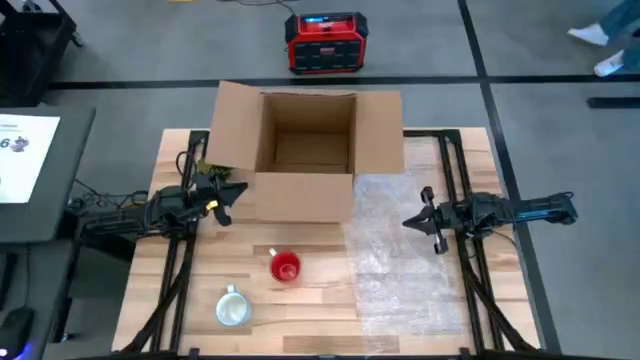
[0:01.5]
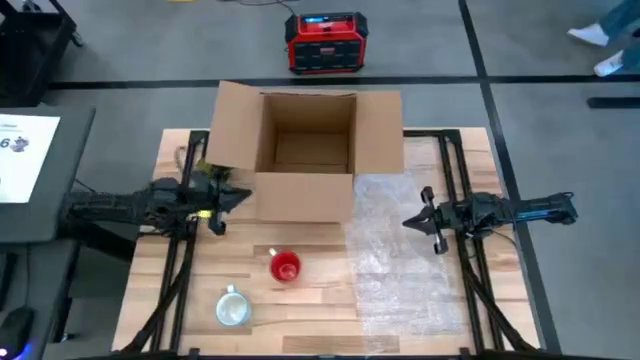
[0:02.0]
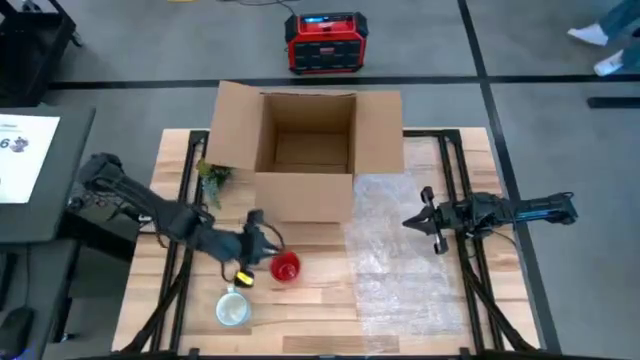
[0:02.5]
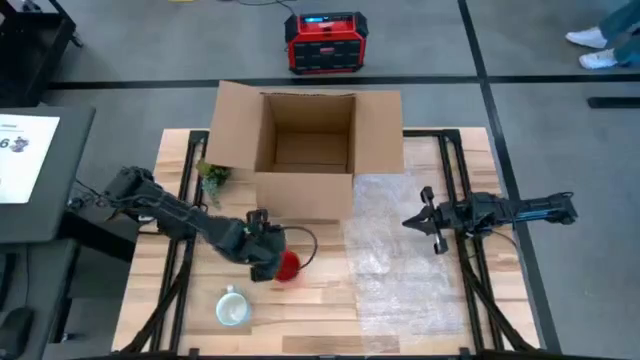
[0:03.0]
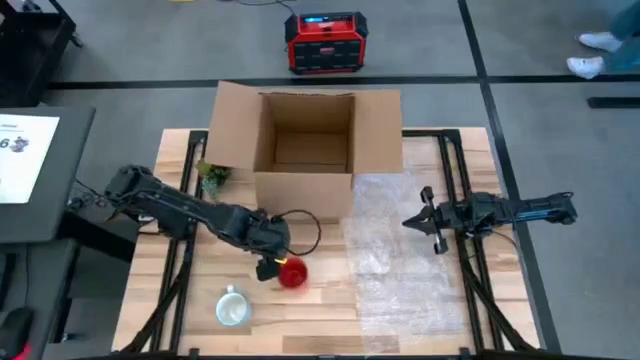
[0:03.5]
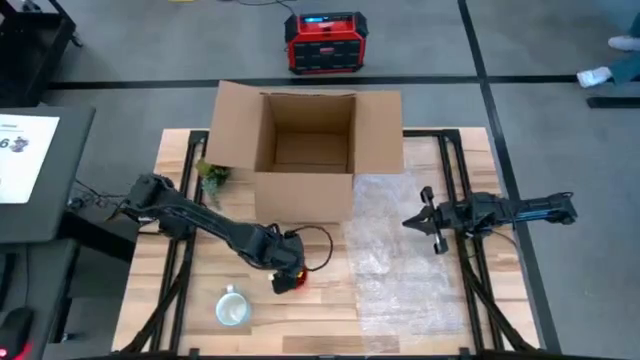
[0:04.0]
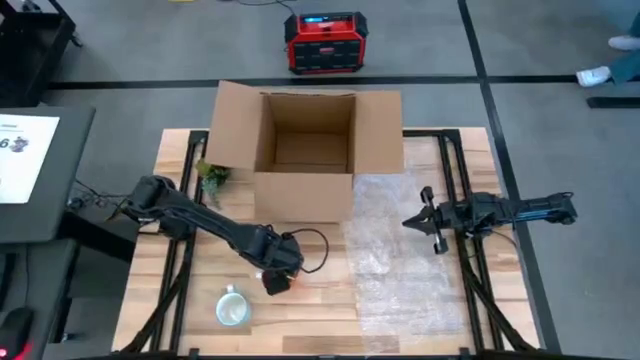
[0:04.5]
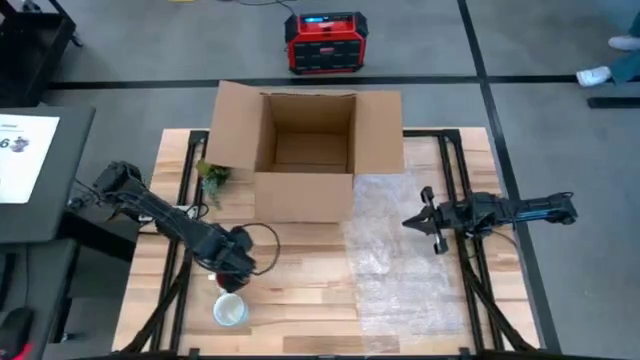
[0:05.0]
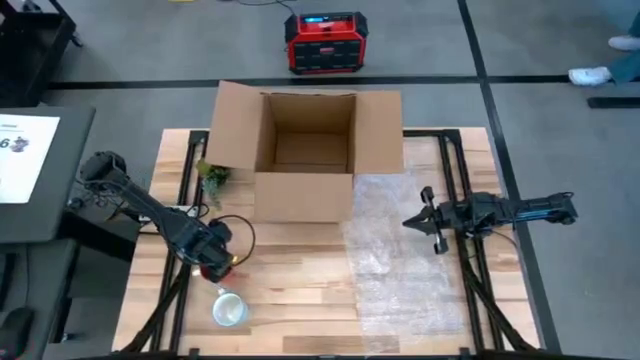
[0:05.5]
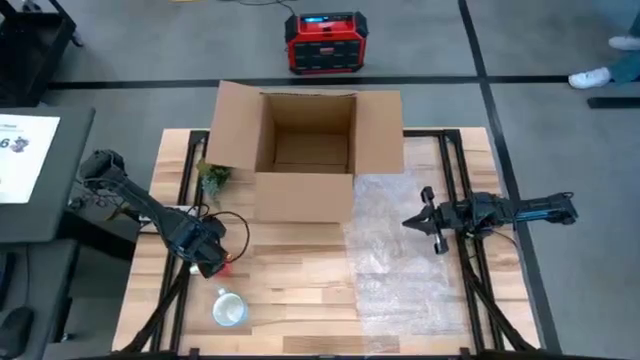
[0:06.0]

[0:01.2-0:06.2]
Task: wrap mug
Move the red mug to the middle left

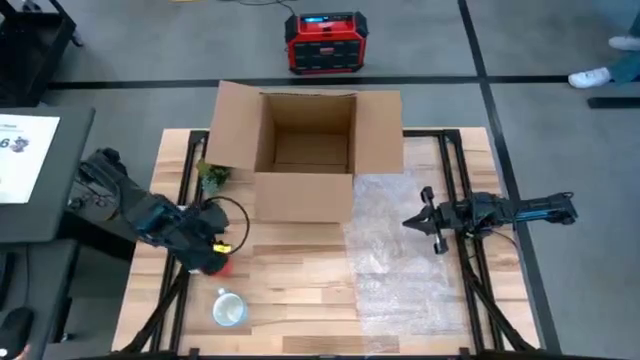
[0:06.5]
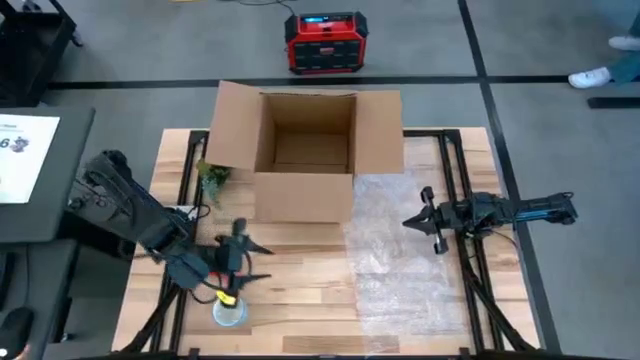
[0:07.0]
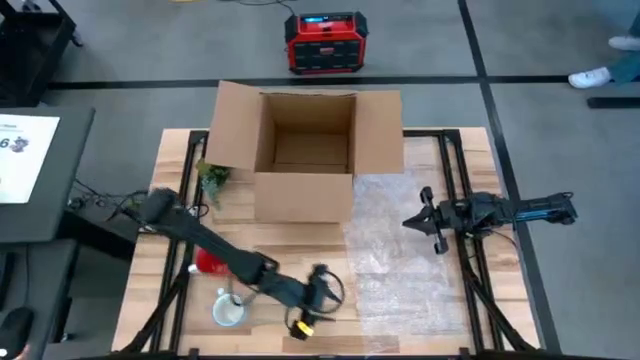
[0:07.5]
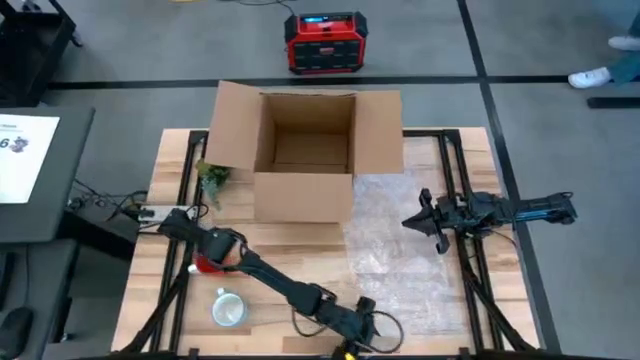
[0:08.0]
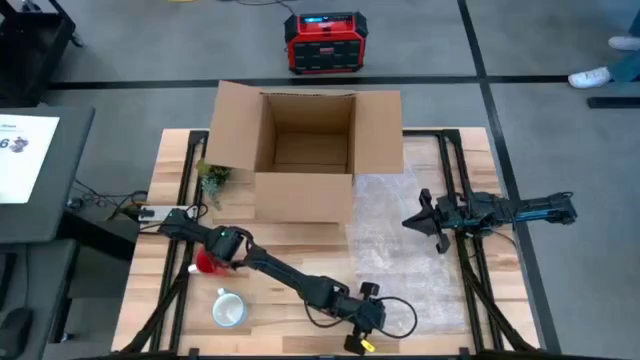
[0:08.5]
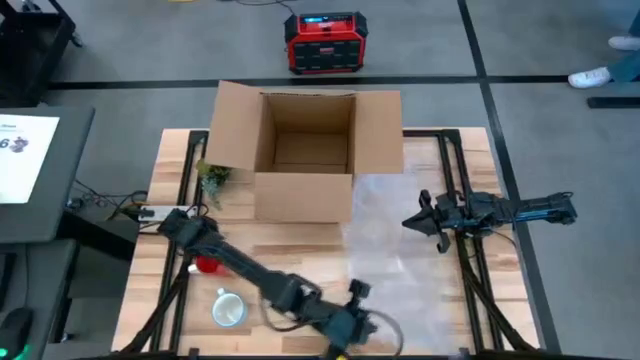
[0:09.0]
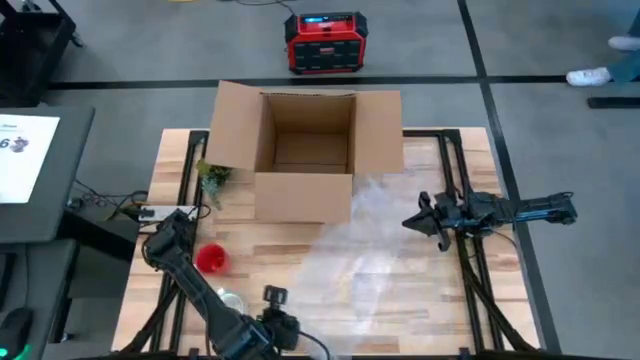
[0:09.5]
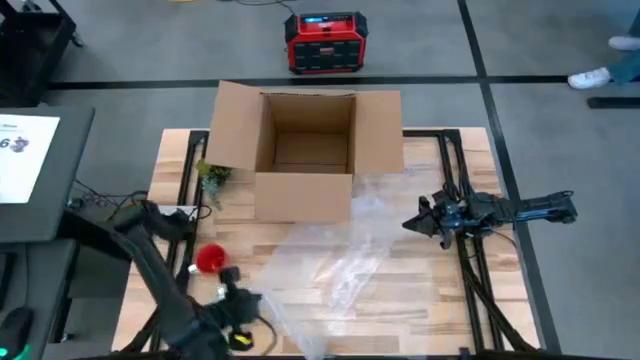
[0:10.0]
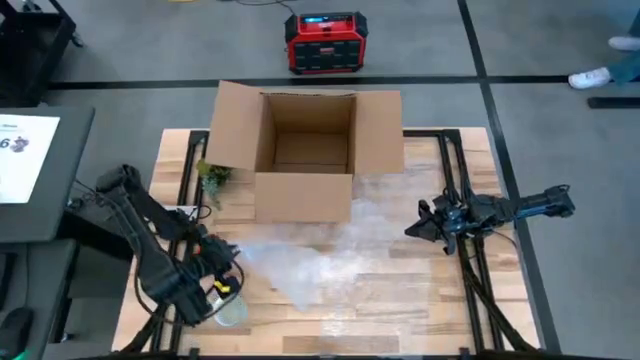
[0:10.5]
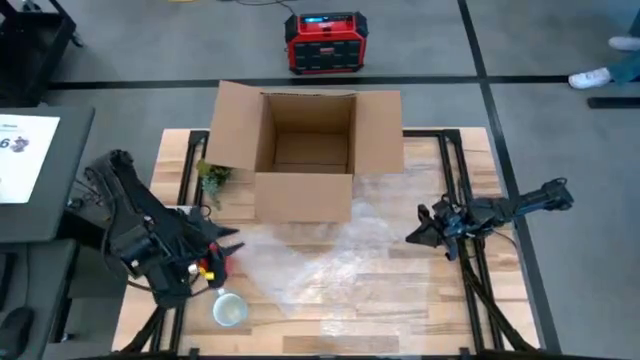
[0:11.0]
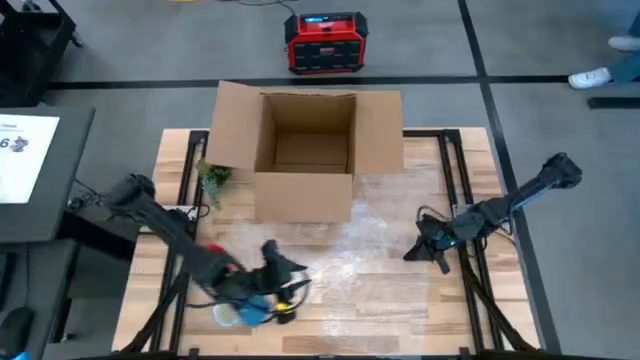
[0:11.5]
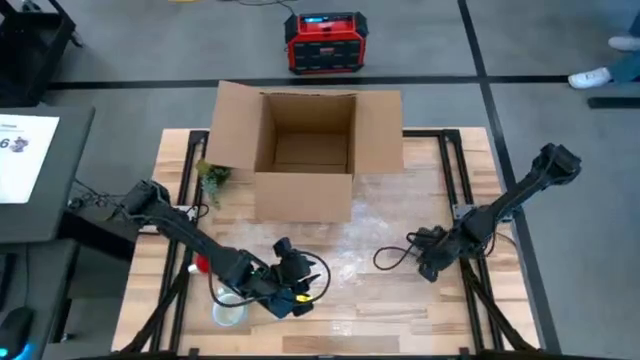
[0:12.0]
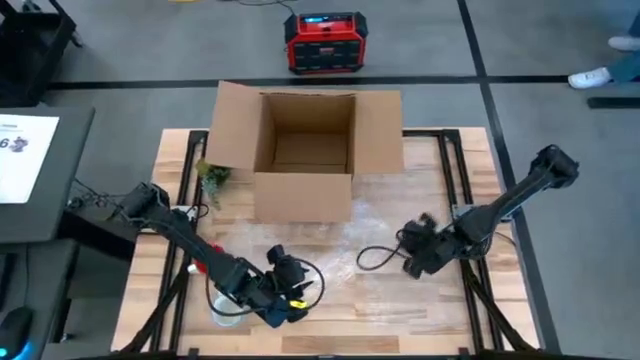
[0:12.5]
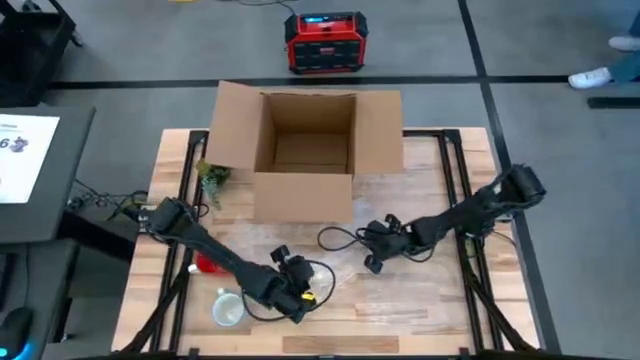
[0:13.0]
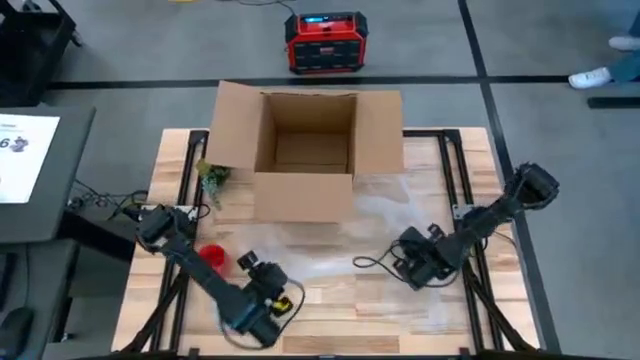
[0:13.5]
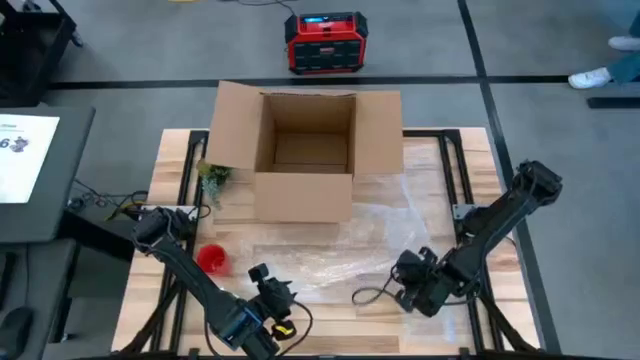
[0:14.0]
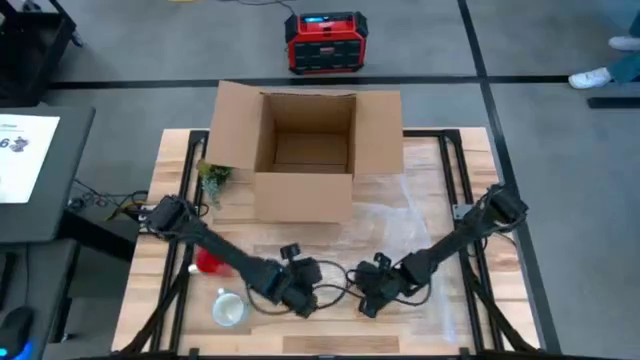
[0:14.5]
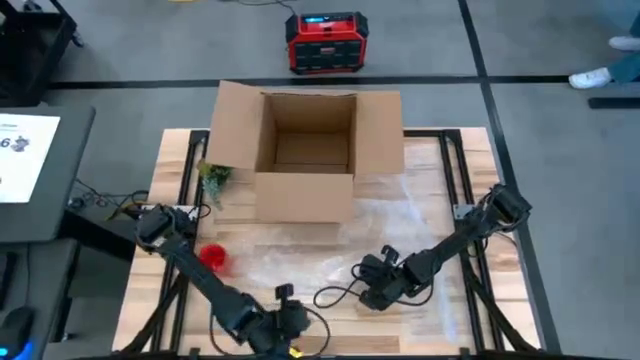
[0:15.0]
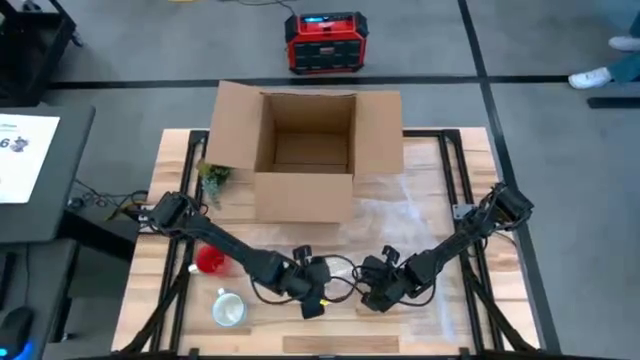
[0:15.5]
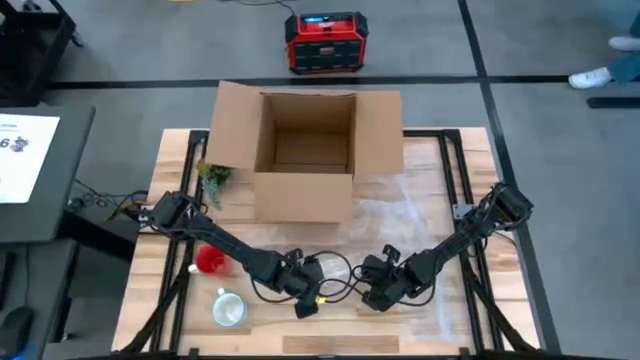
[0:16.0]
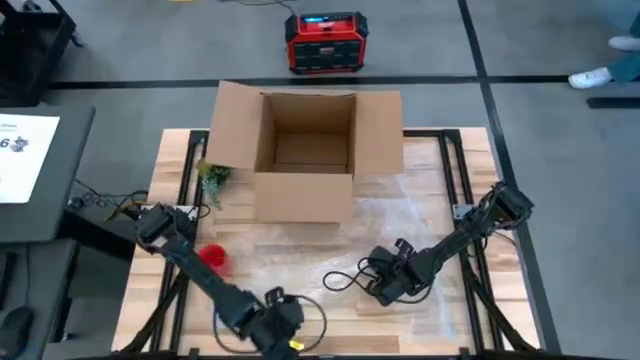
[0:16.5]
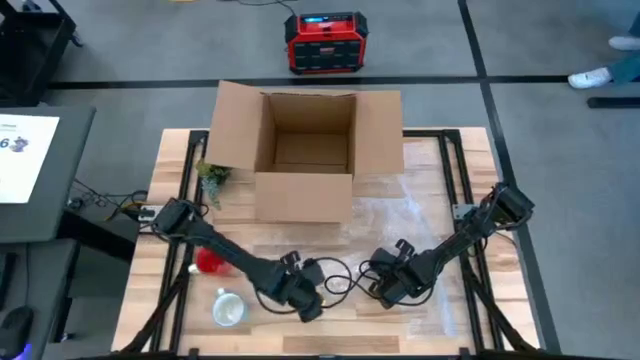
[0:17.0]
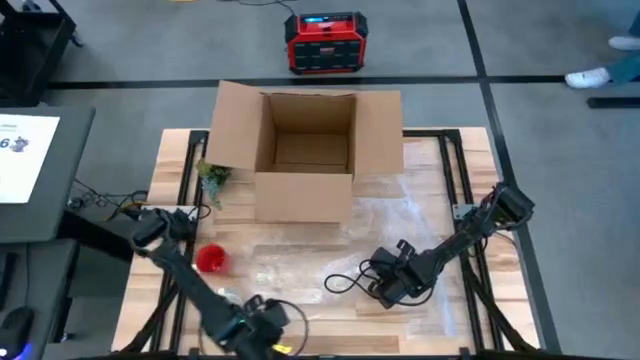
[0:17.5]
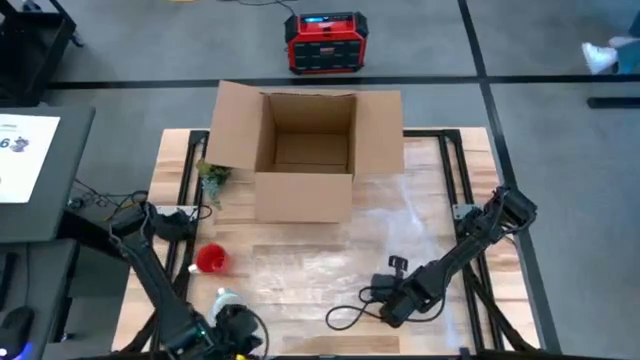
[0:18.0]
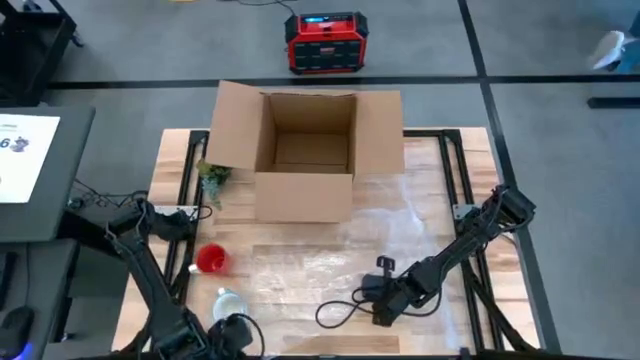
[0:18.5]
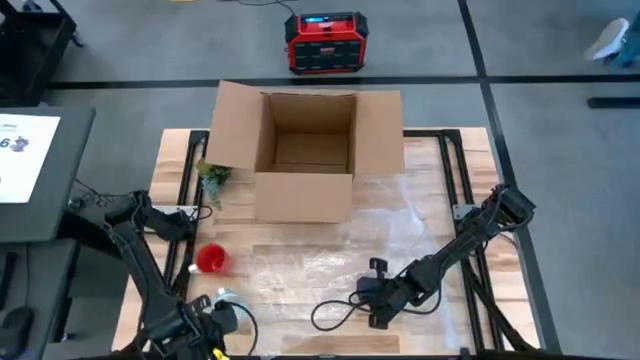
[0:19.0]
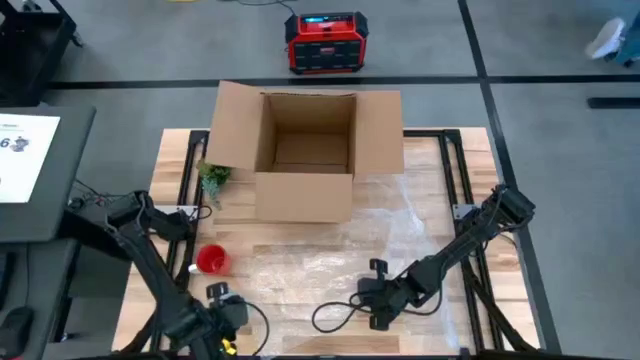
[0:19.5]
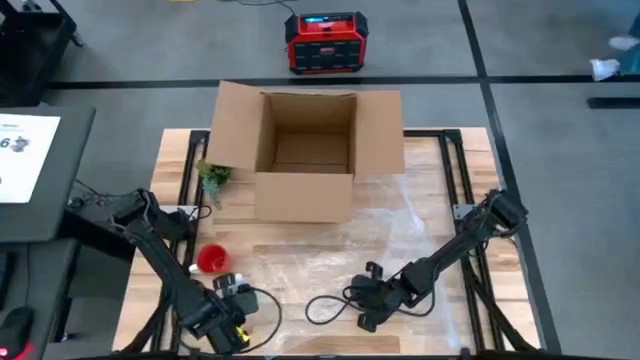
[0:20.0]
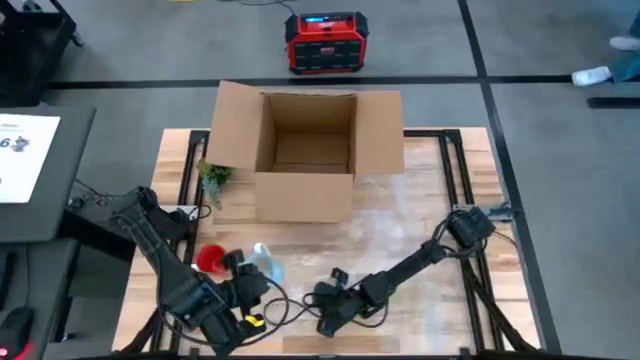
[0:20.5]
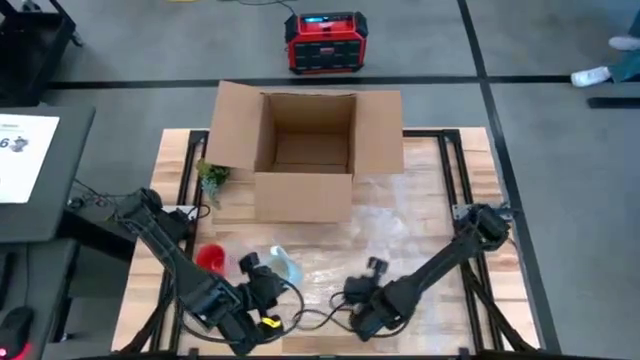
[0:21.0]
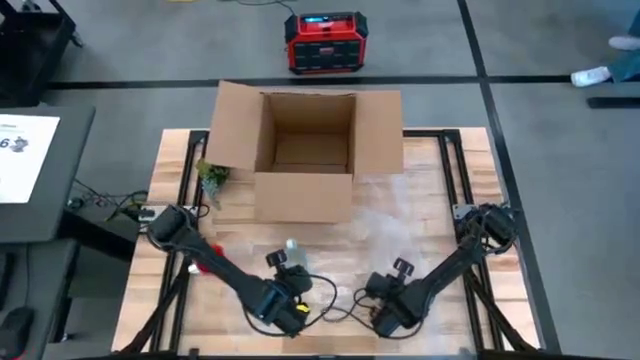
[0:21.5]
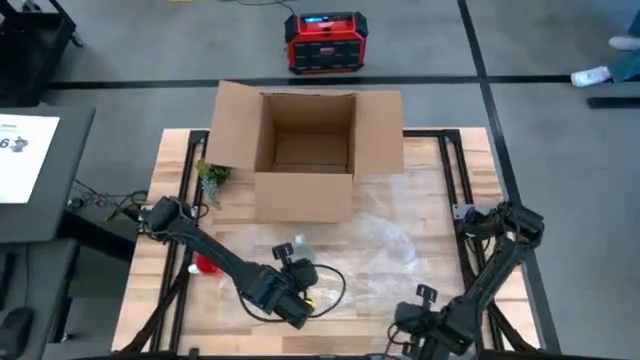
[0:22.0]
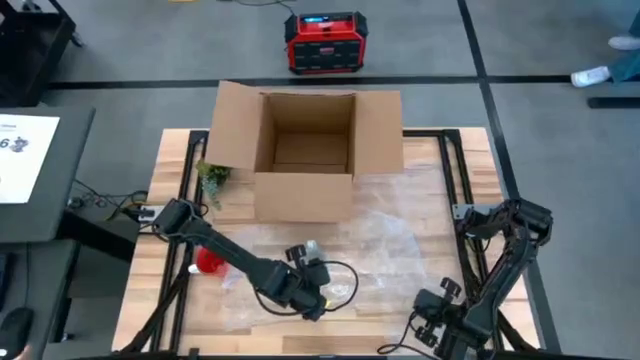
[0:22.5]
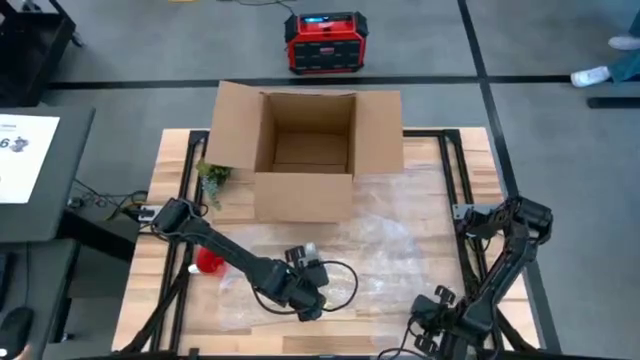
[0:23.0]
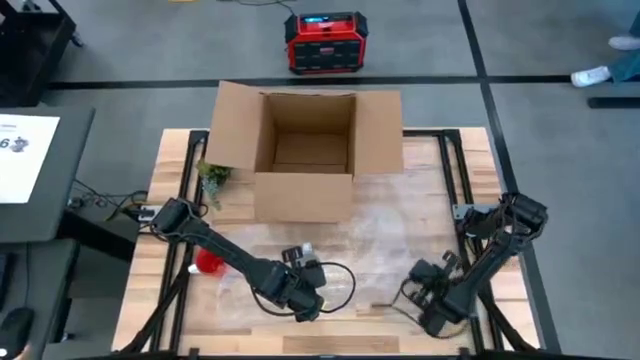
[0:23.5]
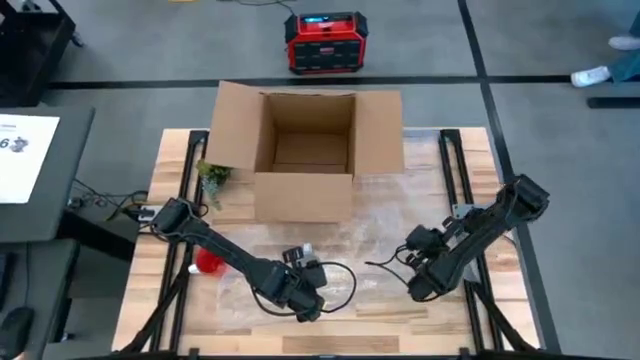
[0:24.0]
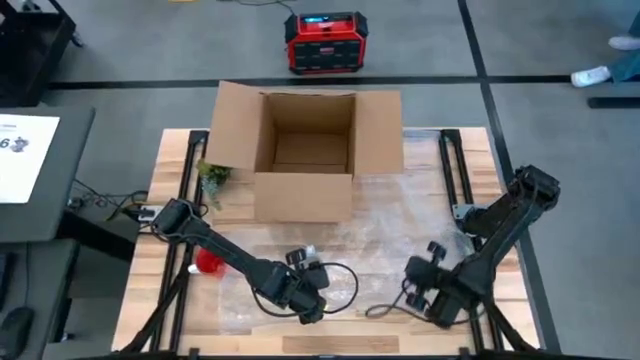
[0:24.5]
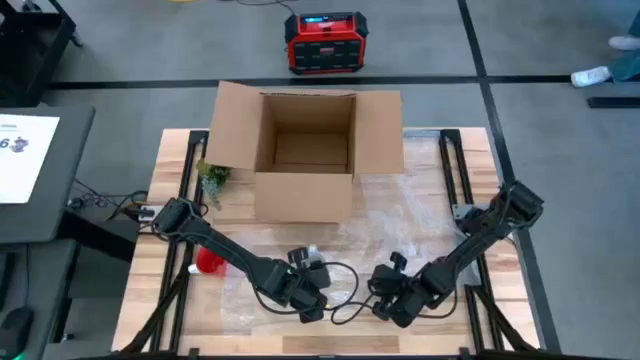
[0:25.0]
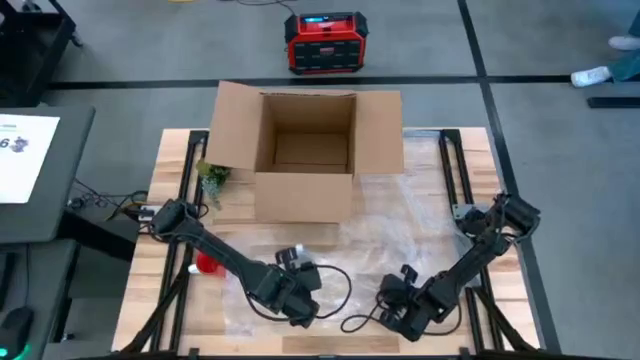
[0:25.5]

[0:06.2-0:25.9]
Pack the white mug with the bubble wrap
